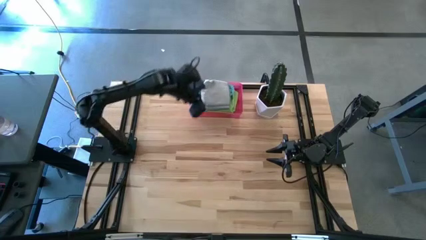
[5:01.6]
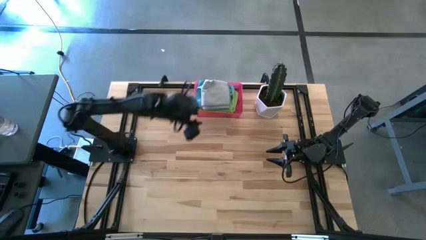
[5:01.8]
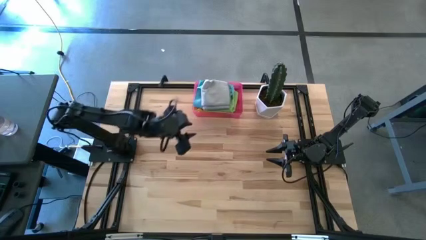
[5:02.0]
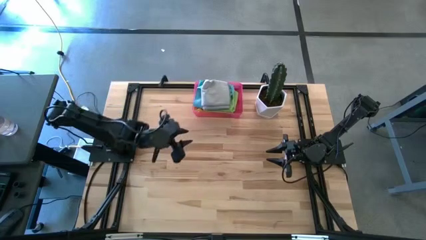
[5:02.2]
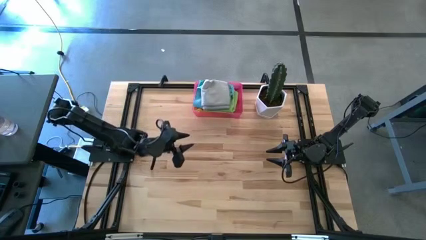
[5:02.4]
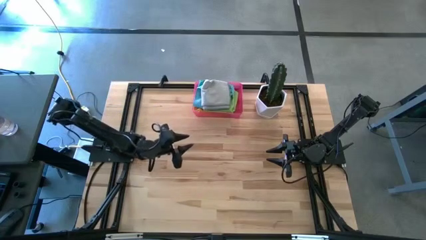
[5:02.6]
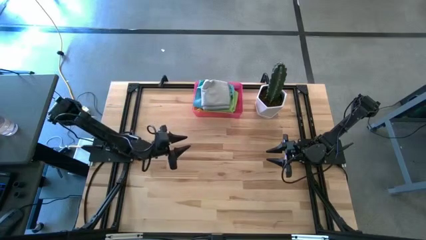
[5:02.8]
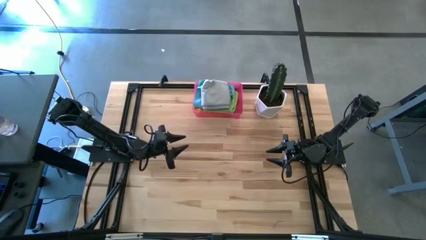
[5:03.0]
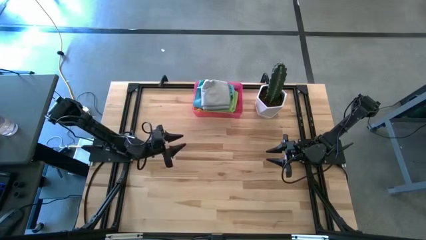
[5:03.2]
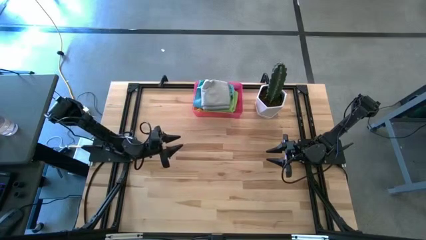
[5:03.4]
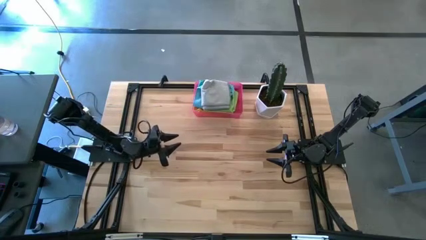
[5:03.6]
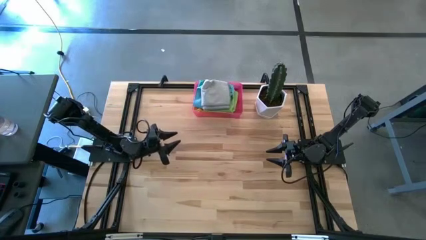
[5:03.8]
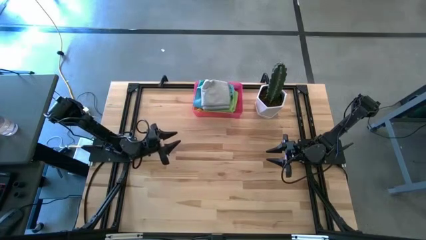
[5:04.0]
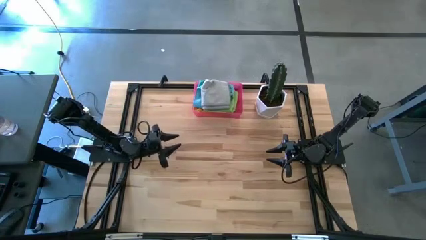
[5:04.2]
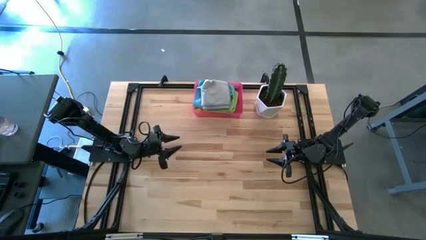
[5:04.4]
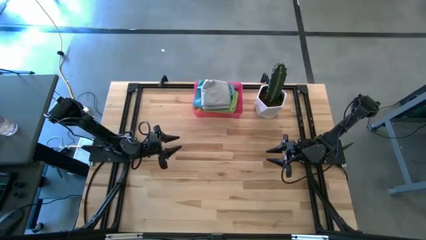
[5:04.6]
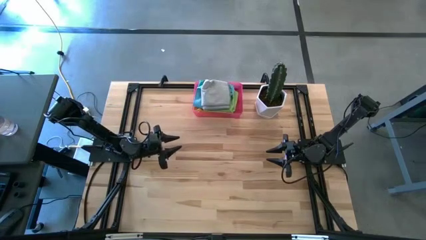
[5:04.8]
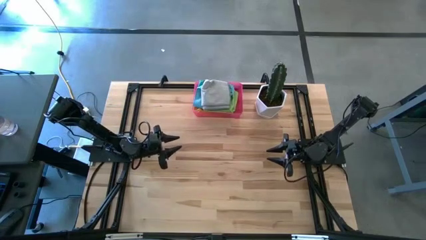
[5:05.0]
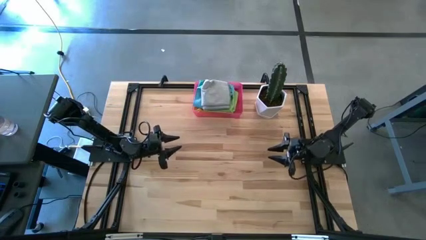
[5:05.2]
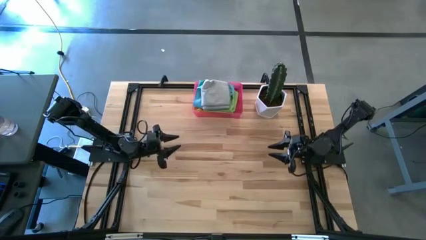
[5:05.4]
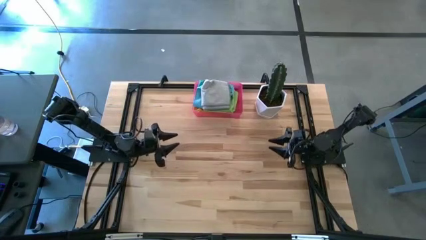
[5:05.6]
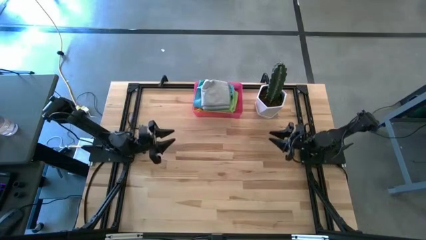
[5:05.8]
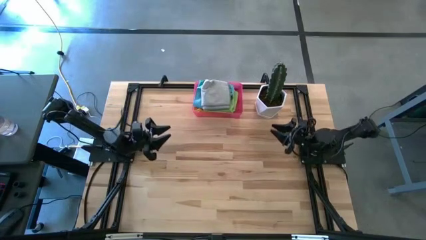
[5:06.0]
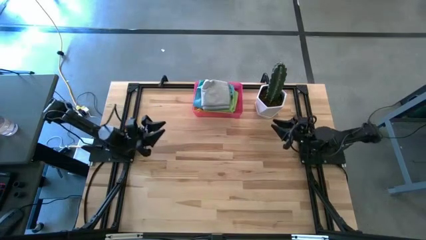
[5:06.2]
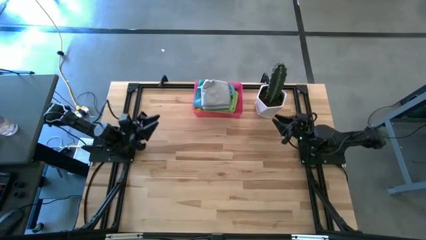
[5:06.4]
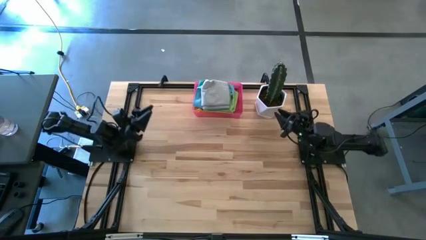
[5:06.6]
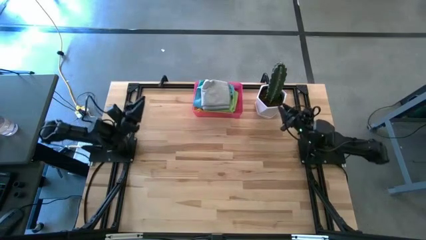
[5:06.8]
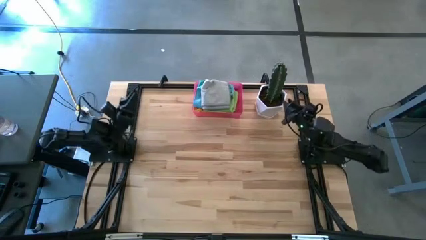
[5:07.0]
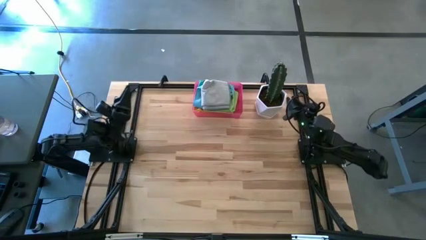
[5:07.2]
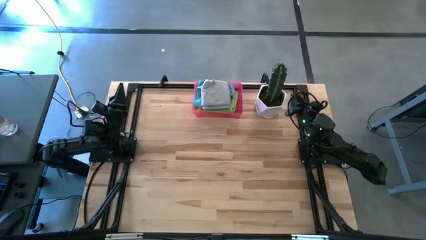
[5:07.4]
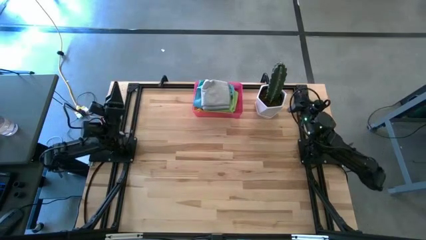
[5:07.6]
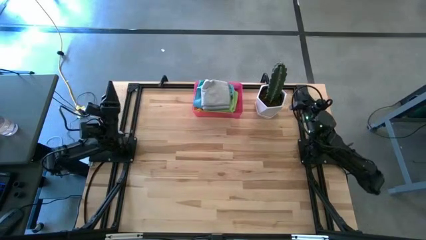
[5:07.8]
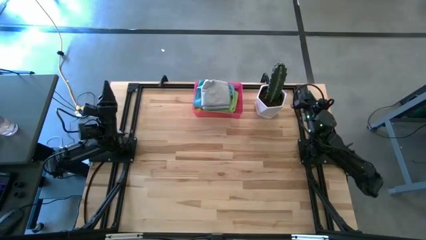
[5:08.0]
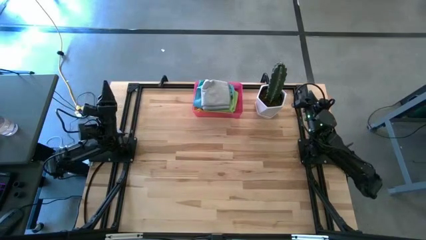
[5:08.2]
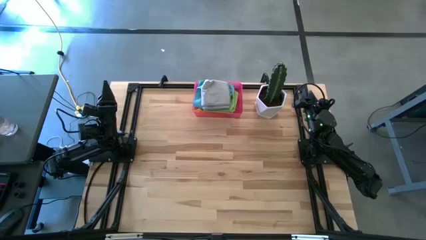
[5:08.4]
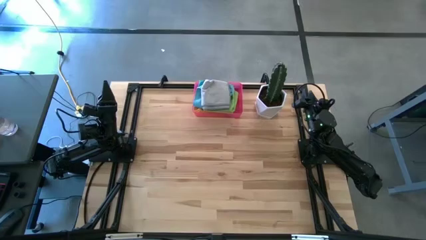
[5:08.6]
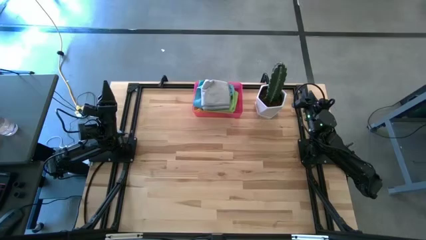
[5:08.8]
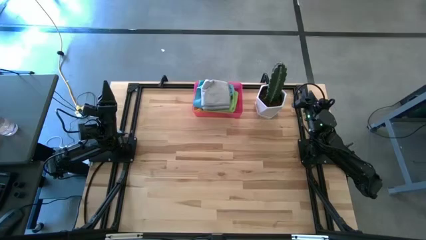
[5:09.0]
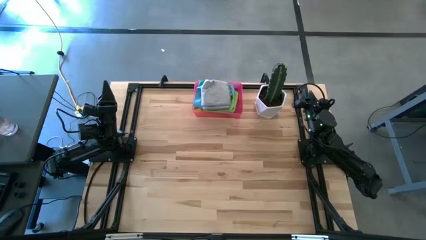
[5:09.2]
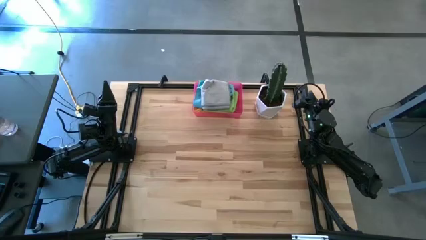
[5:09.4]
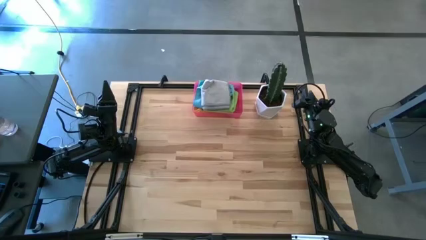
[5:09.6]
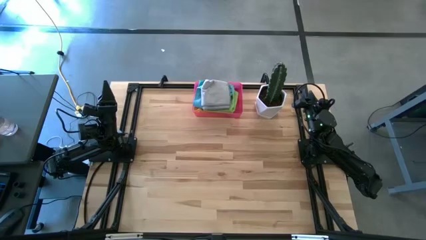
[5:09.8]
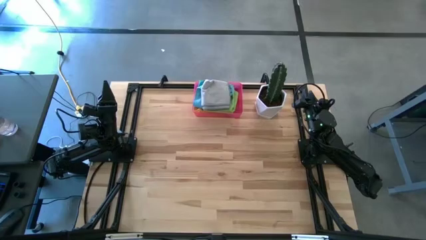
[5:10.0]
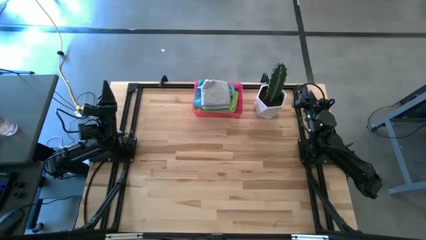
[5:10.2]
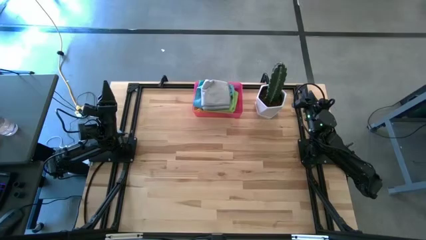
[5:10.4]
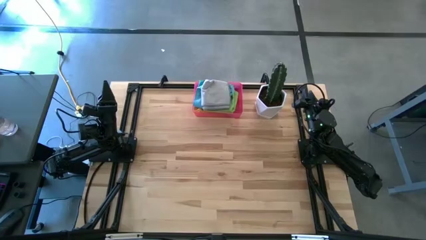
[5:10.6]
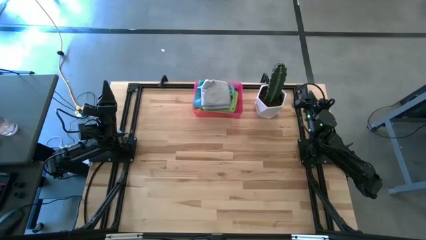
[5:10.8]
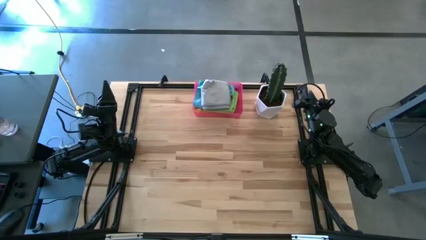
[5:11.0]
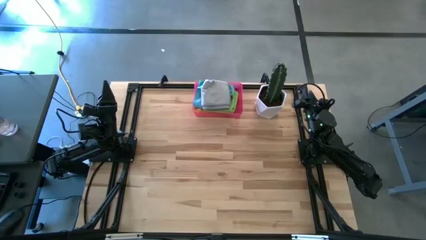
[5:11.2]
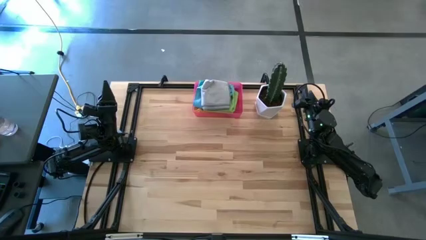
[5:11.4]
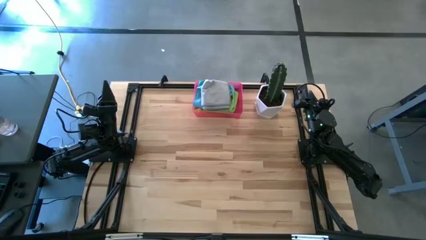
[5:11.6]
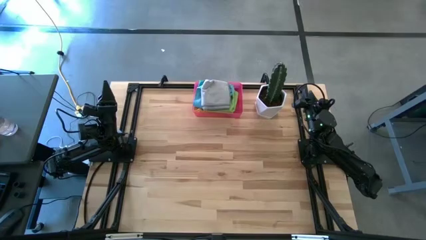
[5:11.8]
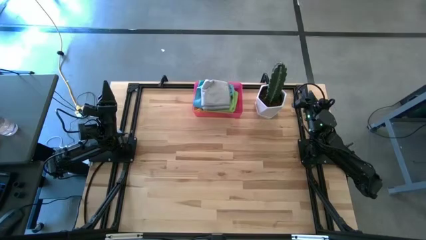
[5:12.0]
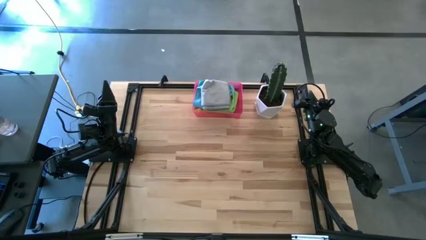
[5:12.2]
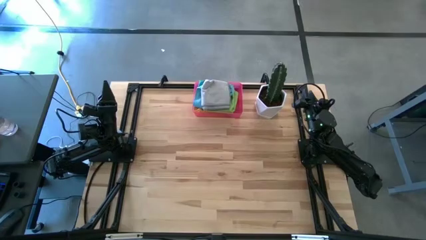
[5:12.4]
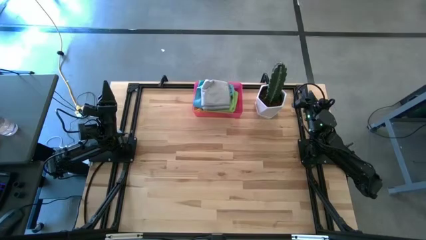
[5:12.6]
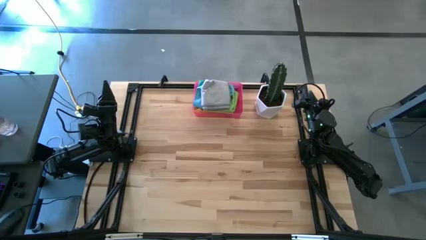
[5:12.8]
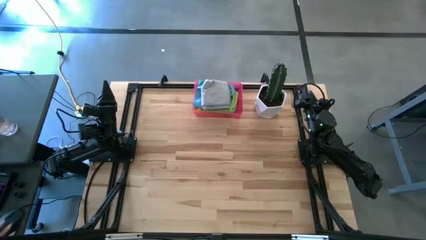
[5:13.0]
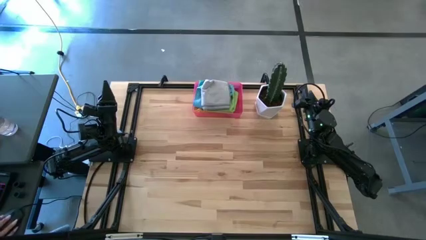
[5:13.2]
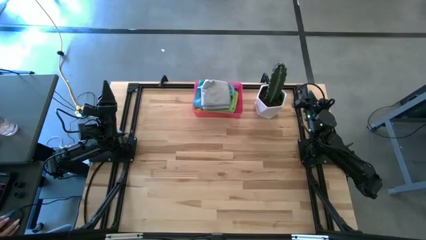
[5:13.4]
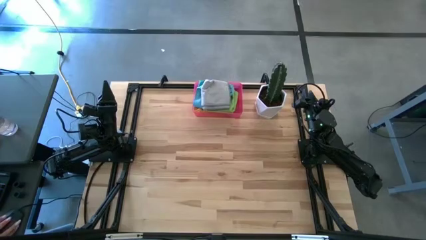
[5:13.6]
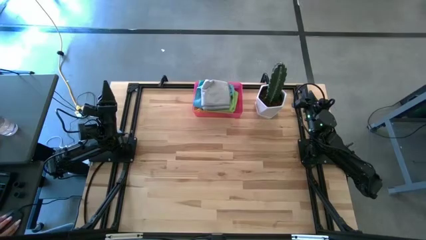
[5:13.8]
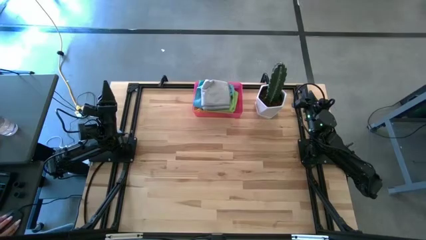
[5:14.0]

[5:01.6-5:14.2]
Task: Fold microfiber towels
Return to Home Position

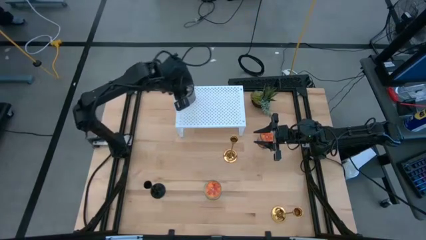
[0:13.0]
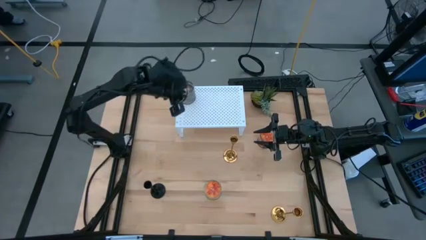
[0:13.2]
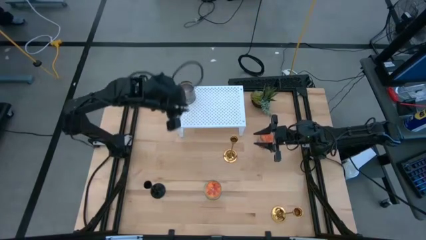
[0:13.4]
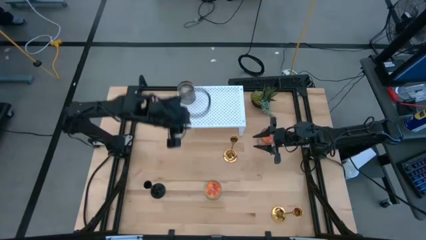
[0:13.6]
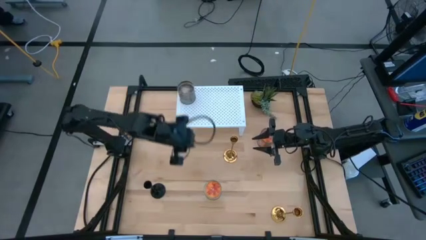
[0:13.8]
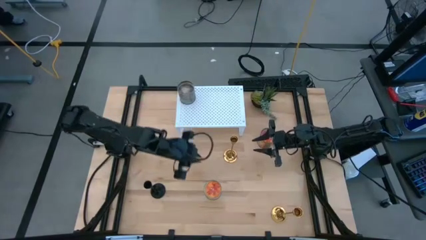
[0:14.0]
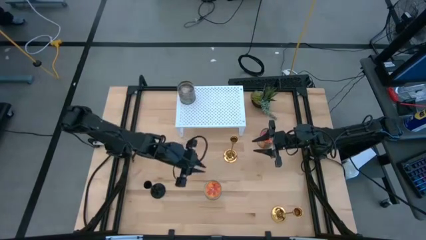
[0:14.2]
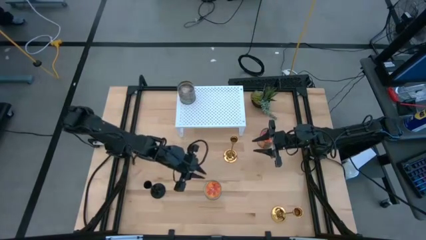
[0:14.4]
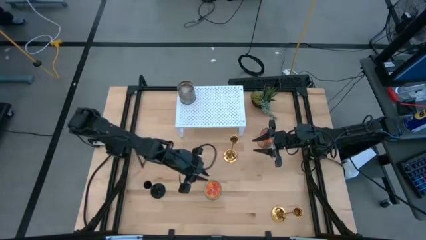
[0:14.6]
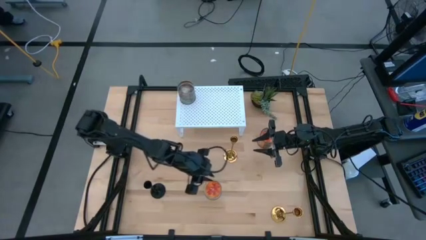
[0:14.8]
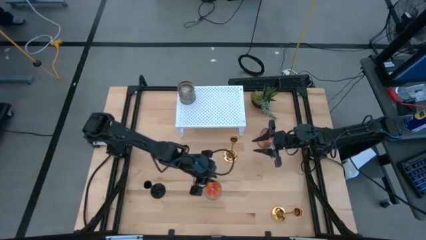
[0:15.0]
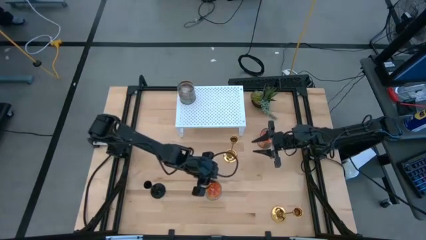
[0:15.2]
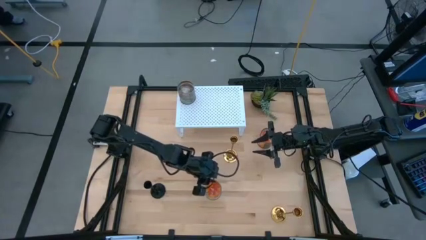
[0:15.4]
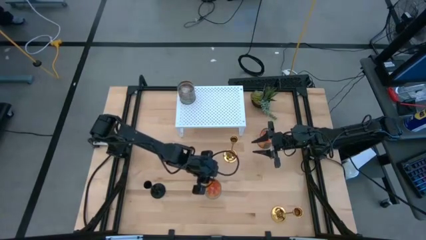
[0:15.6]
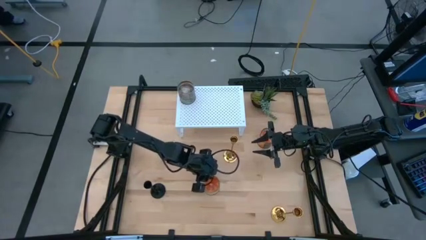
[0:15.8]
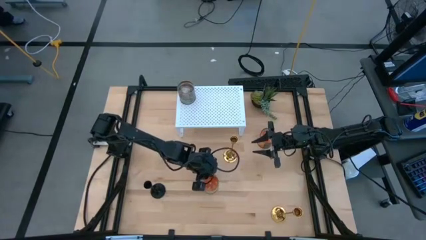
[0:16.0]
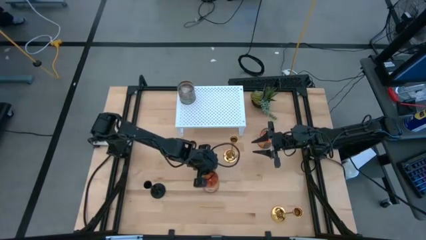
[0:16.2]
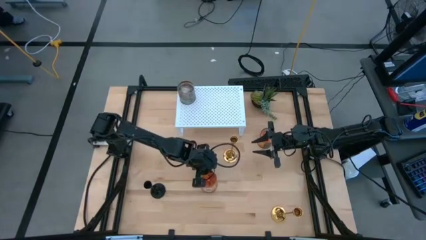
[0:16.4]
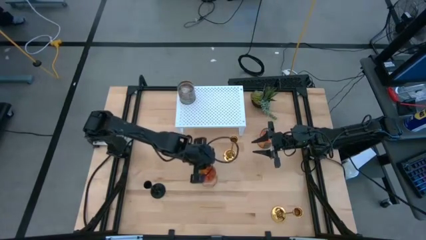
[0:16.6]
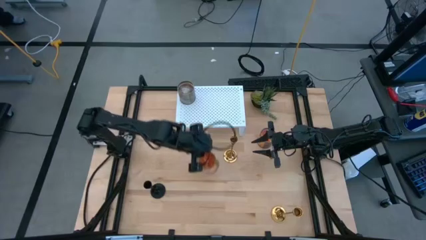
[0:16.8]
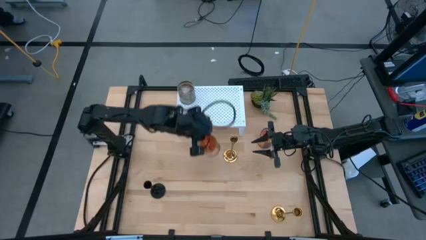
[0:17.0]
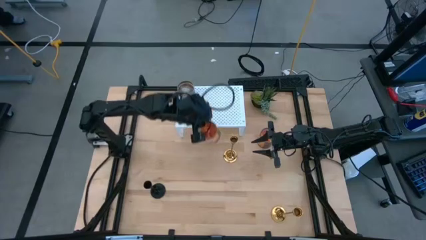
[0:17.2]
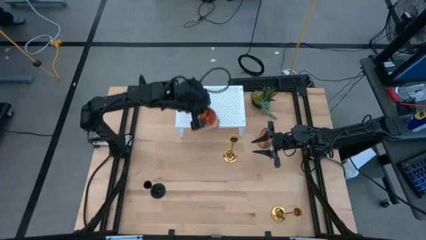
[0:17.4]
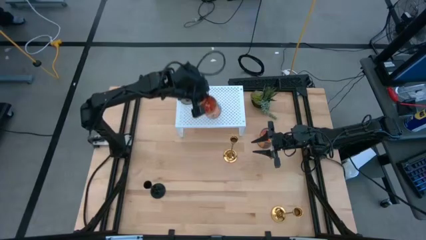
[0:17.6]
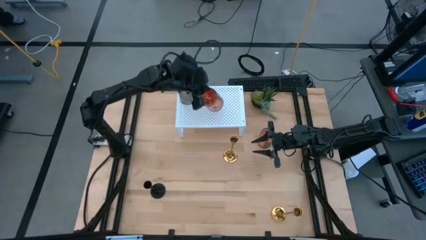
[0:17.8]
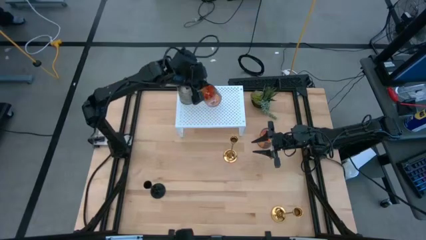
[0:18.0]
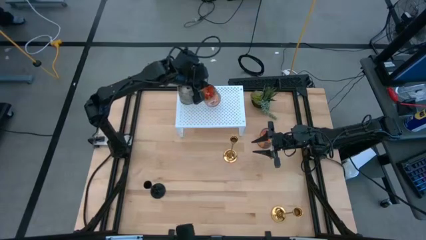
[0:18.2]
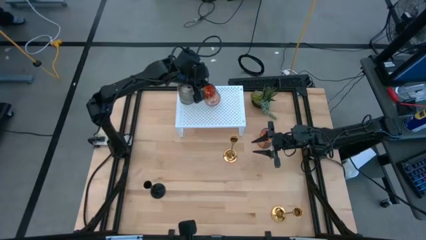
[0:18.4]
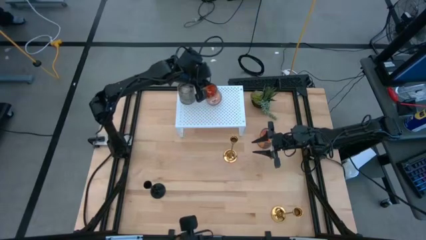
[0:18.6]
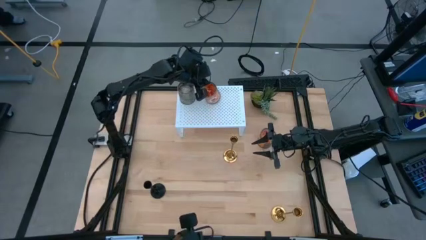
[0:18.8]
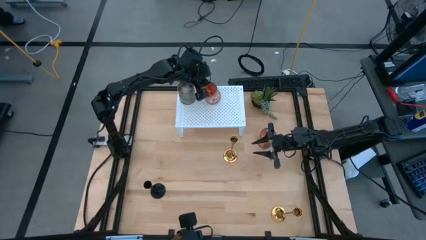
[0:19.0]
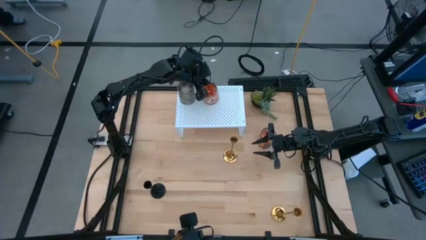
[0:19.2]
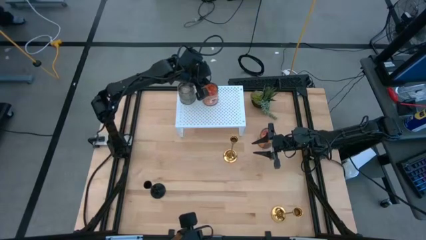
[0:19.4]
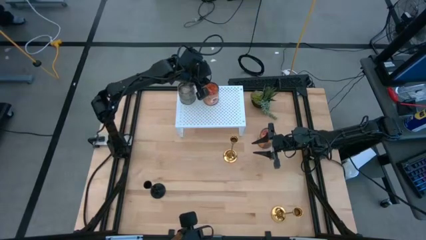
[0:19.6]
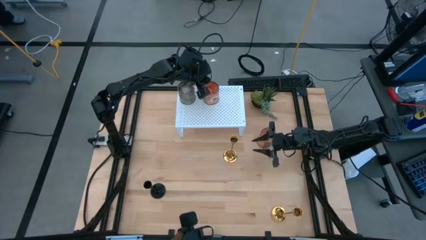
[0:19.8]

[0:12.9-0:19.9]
Task: Pick & Place candle stick holders
Put the bottom orange scented candle on the shelf aligned with the other scented candle
